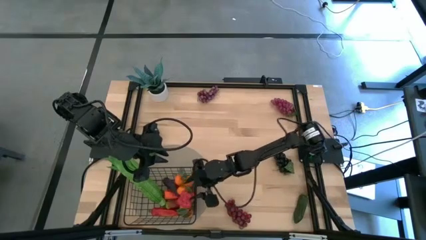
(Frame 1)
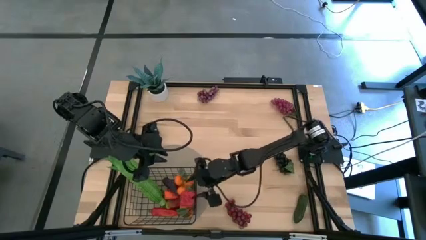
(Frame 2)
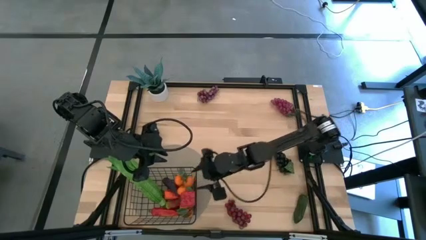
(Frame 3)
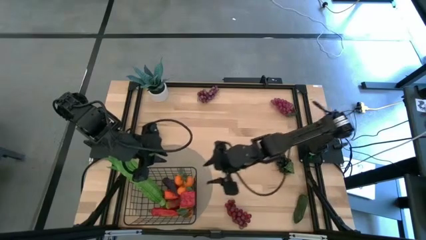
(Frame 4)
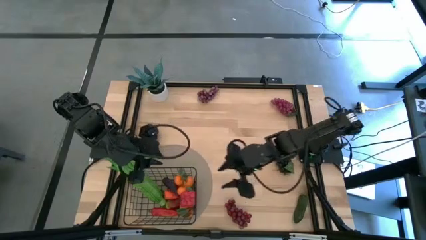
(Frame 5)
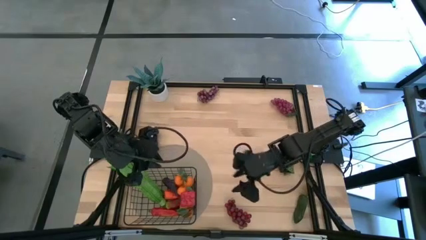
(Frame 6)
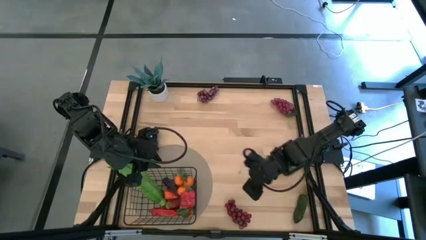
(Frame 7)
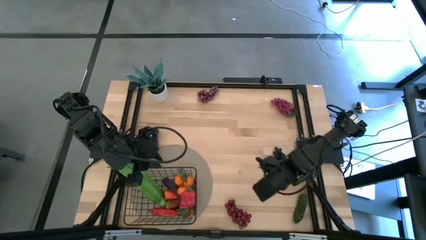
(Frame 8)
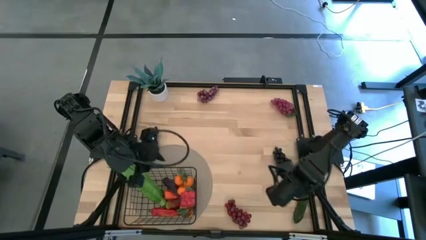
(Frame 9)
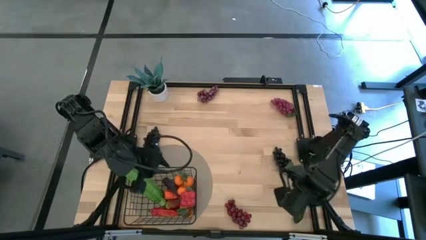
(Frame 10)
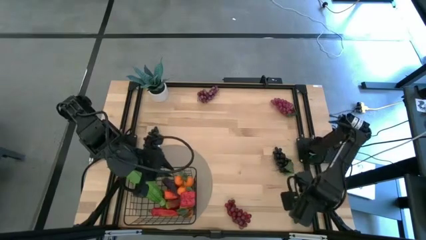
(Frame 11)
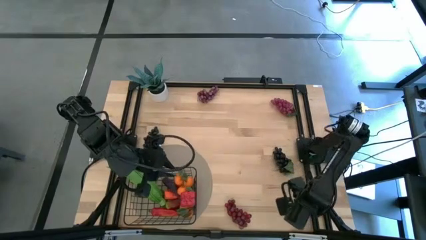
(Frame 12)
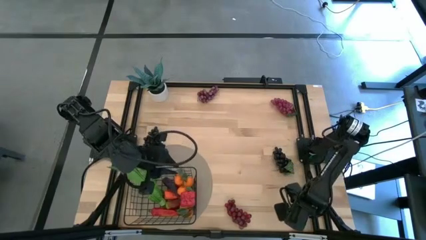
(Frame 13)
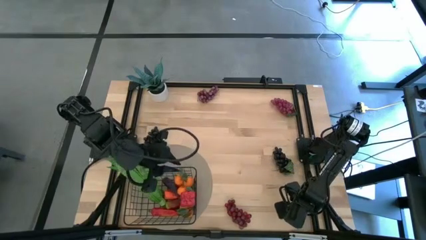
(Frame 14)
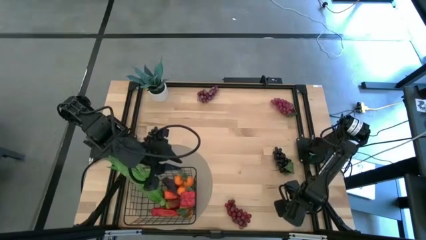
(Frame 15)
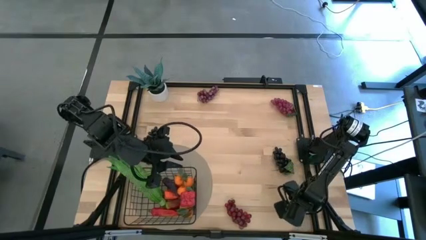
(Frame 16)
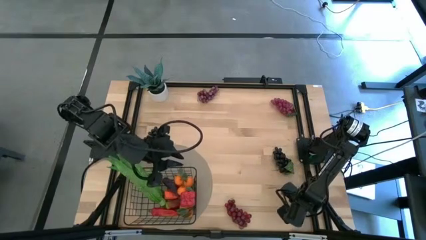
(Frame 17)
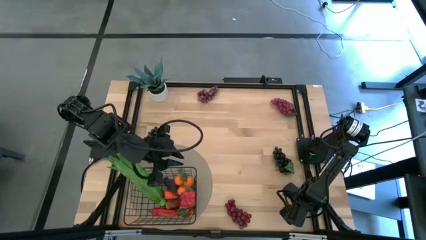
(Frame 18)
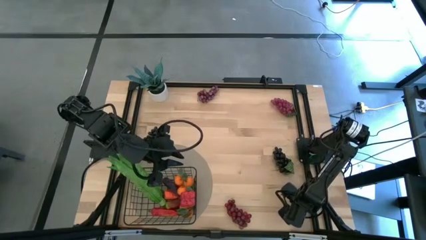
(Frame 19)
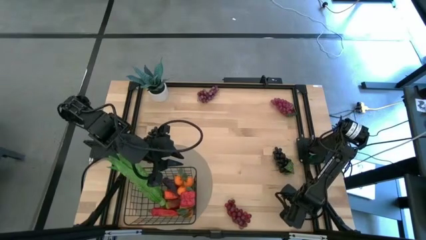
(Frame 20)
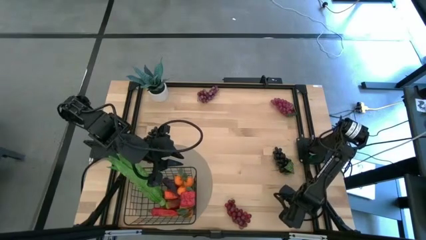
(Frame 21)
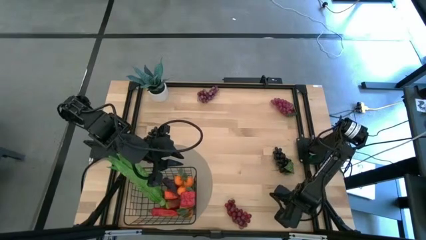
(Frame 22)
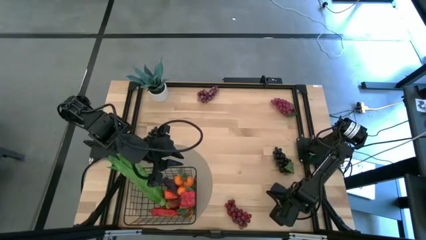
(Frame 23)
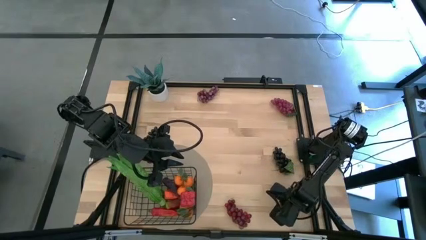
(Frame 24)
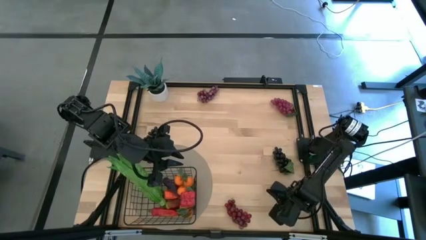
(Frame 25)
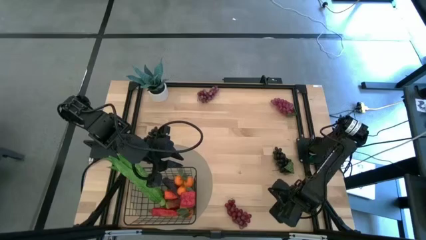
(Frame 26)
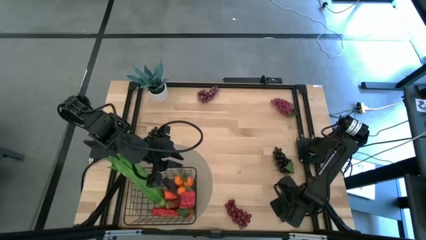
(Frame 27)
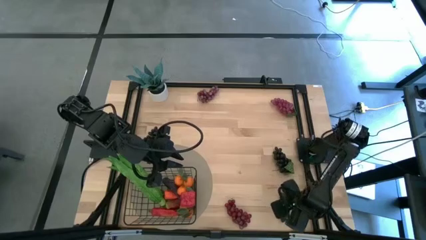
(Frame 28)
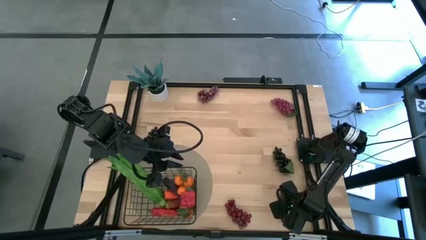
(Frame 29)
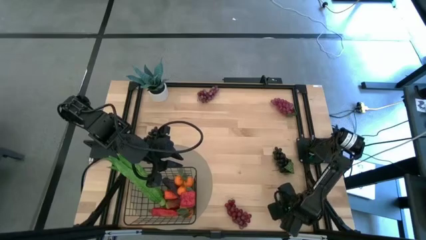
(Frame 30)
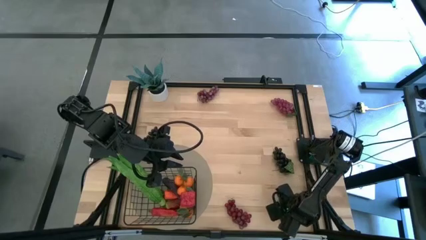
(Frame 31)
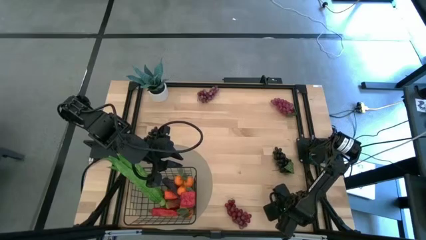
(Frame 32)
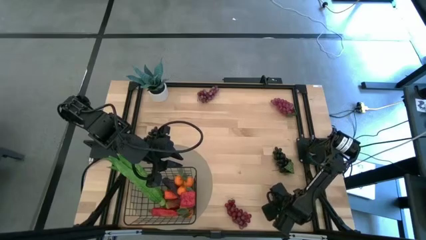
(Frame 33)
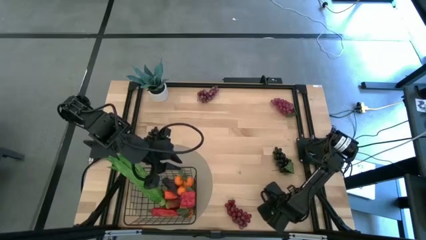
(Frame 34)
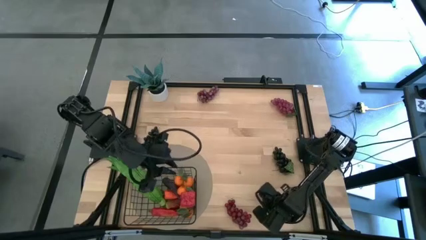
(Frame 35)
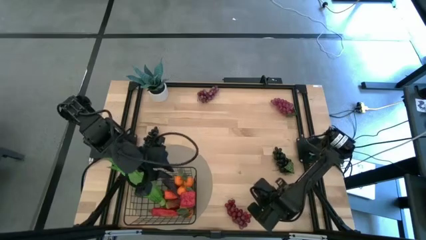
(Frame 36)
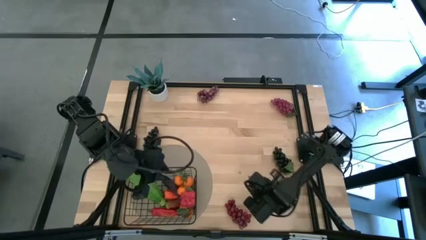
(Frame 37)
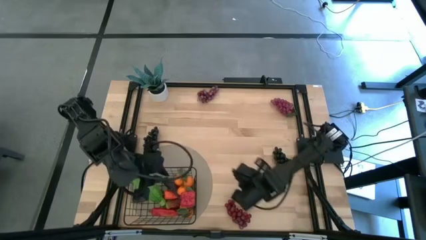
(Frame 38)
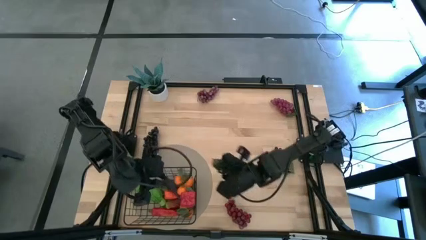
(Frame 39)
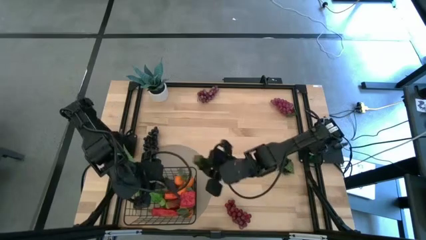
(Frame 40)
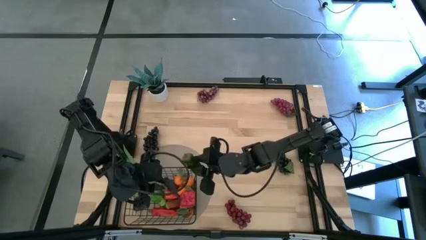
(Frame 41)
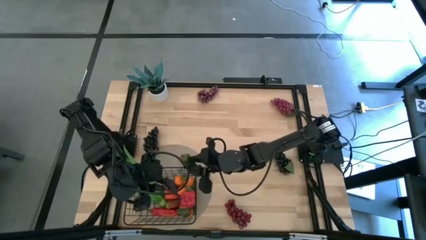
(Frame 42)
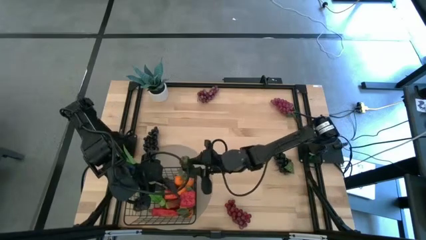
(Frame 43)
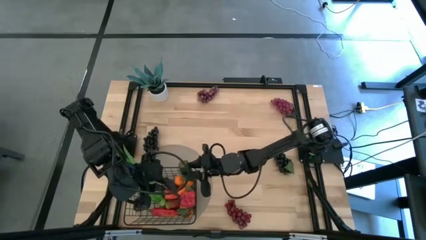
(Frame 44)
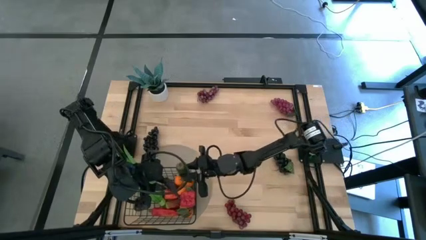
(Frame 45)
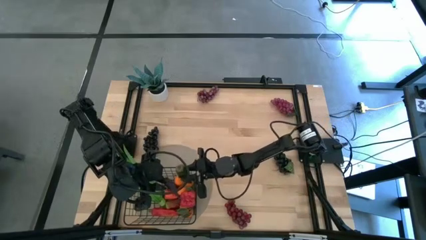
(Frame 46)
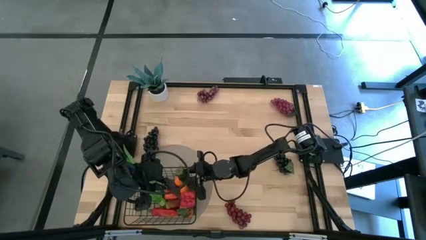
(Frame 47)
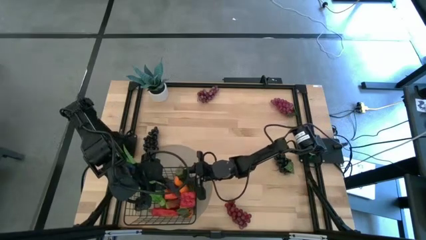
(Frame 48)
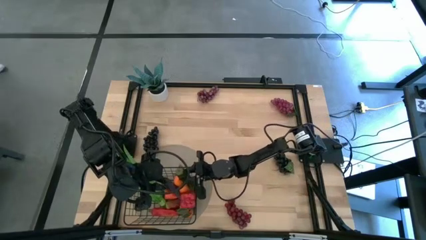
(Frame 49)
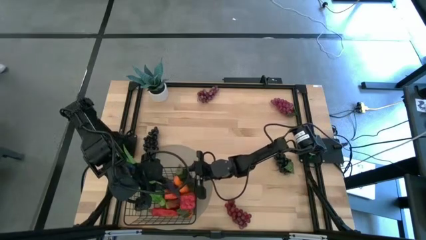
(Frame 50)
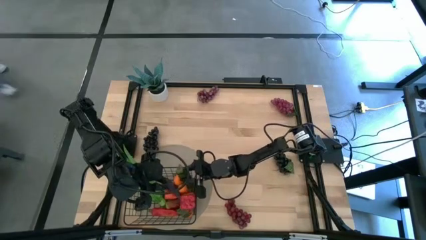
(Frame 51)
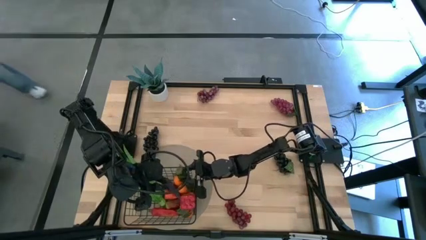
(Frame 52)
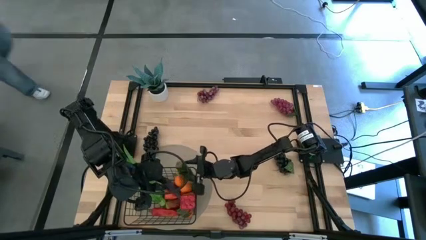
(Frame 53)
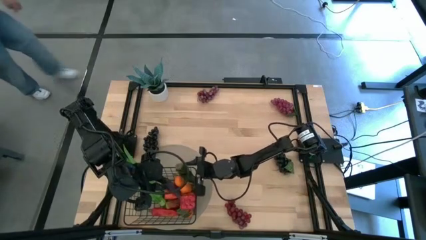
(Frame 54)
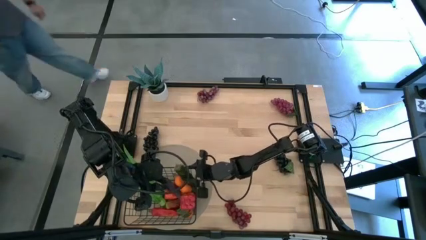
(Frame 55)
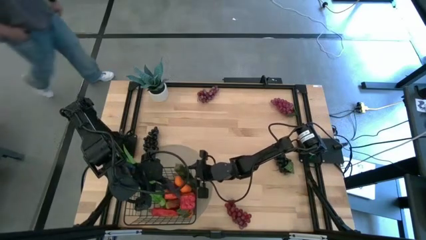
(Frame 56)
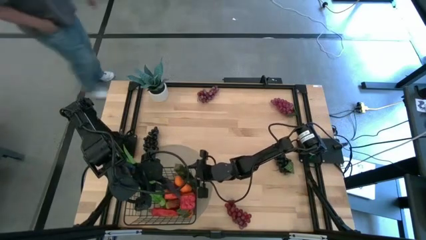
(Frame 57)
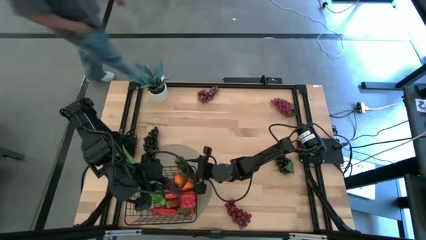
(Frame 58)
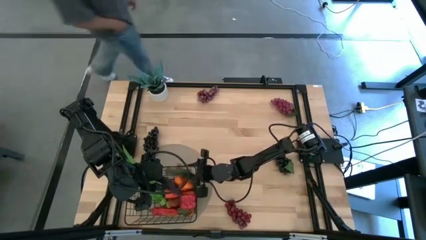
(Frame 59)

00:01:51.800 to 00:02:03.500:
Task: Build produce basket
Put the green chilli pepper into the wire basket

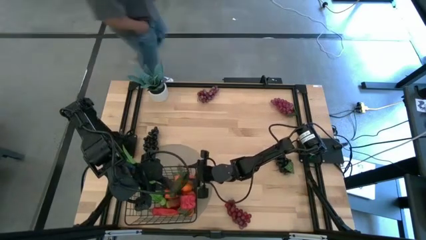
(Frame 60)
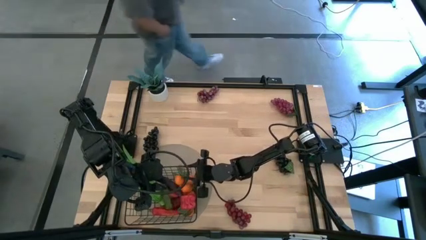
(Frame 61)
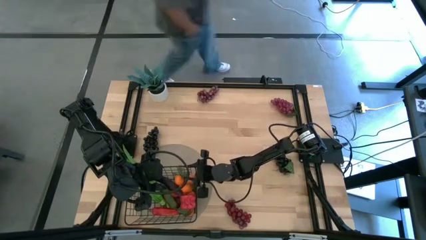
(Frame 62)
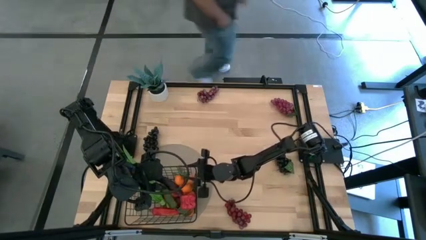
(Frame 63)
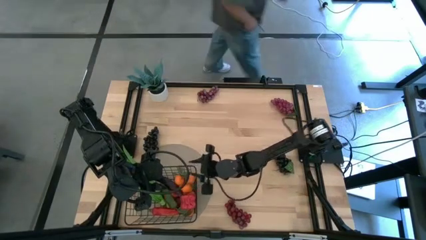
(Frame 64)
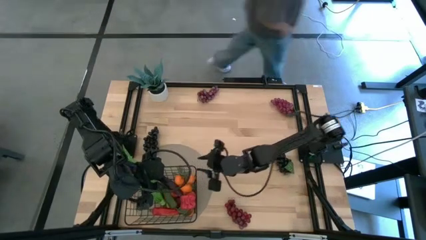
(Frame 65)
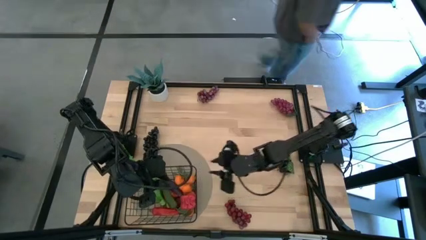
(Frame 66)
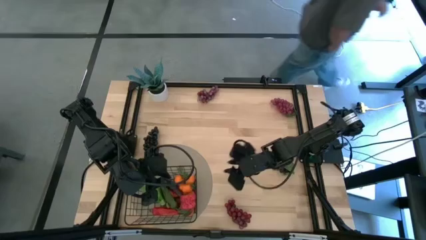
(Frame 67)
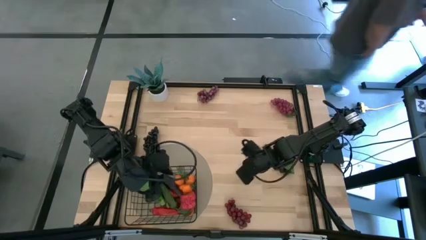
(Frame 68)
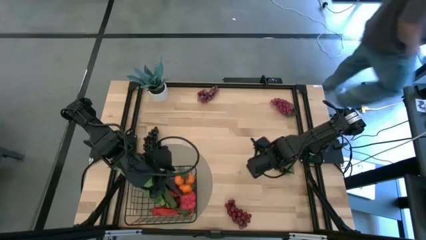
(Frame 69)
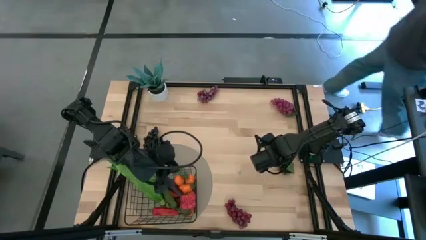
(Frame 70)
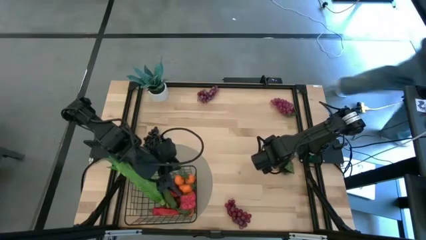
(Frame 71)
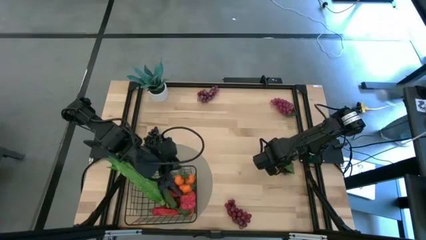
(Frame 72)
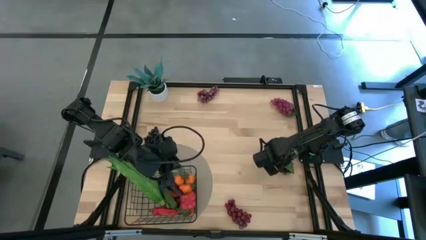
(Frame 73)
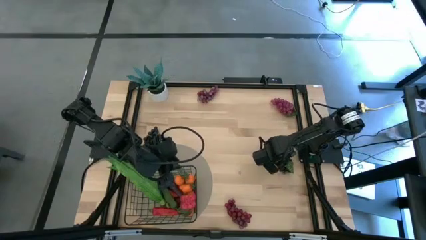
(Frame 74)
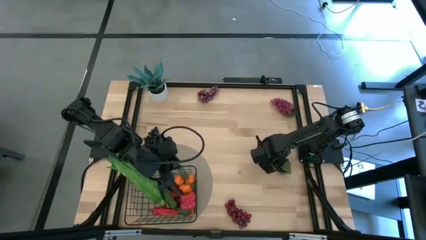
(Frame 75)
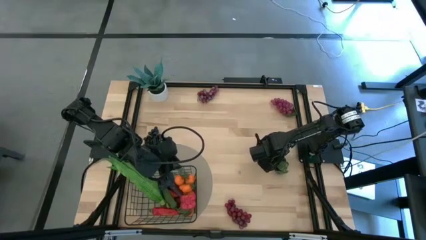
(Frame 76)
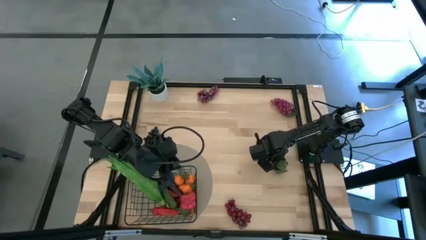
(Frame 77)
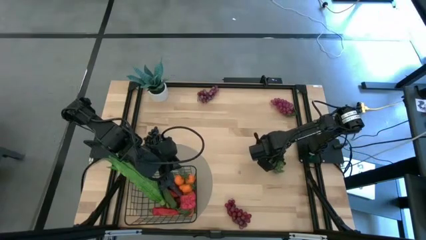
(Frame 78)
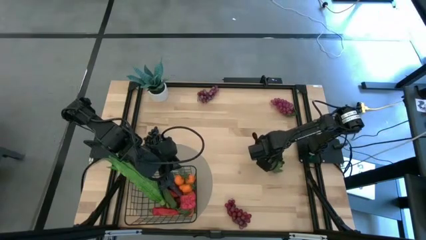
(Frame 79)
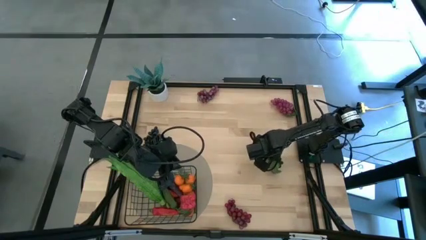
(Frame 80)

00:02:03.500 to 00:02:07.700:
Put the right black grapes into the wire basket
